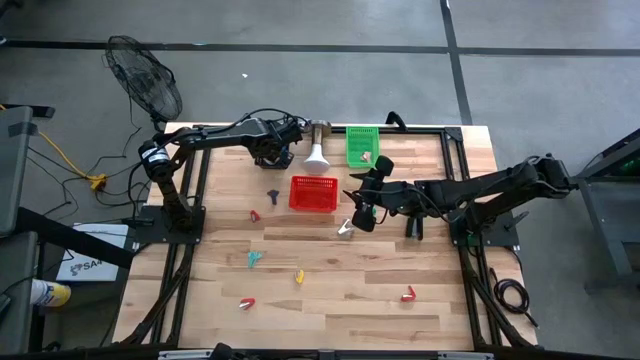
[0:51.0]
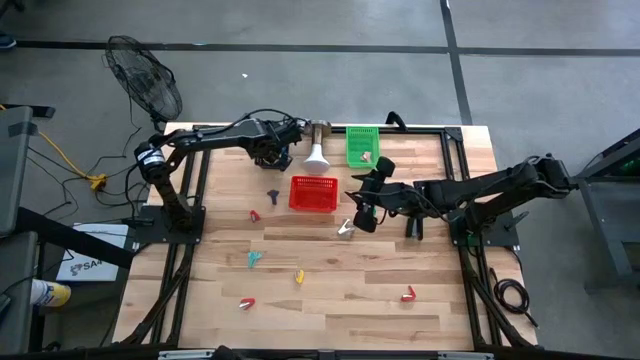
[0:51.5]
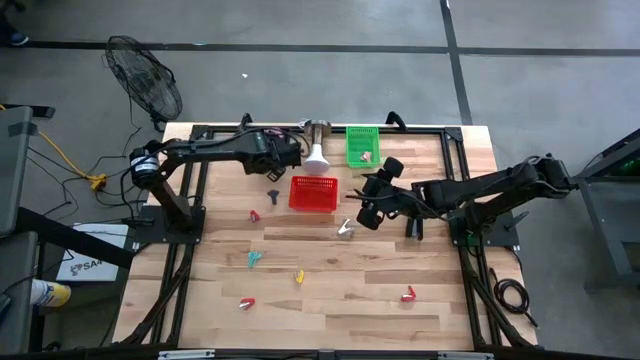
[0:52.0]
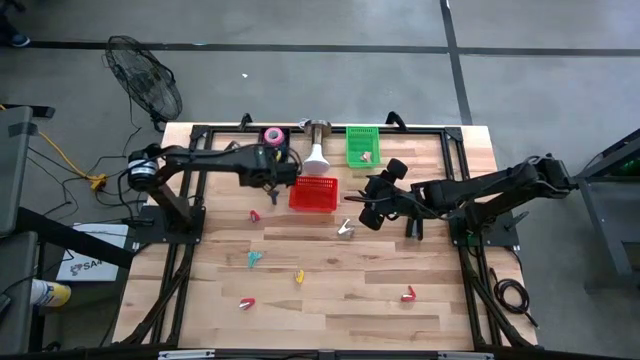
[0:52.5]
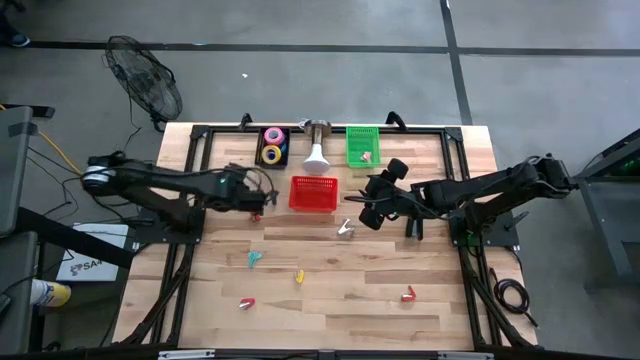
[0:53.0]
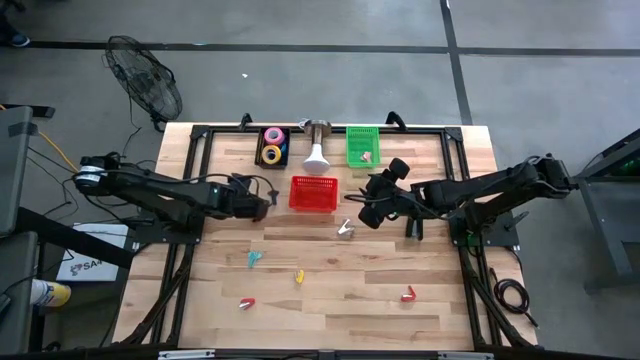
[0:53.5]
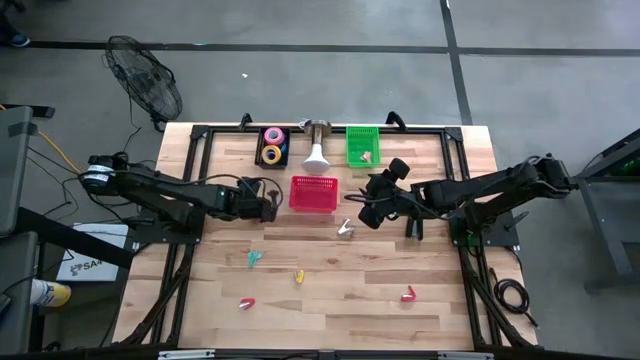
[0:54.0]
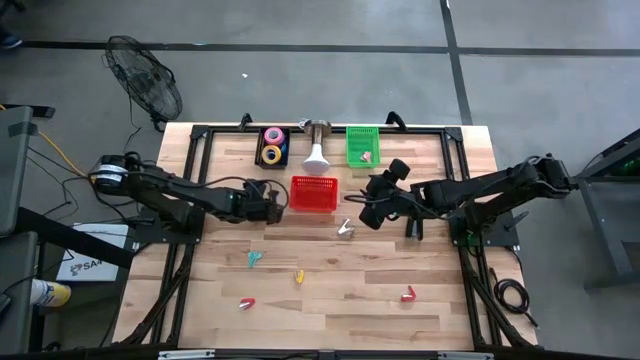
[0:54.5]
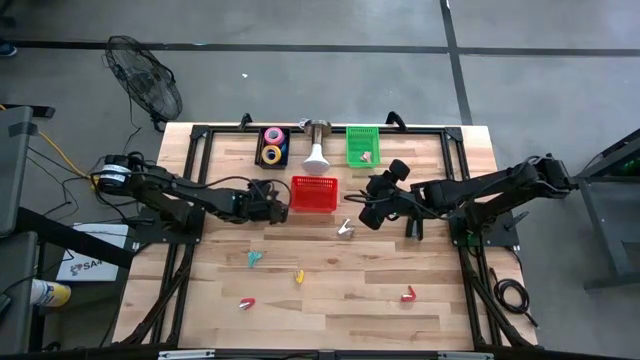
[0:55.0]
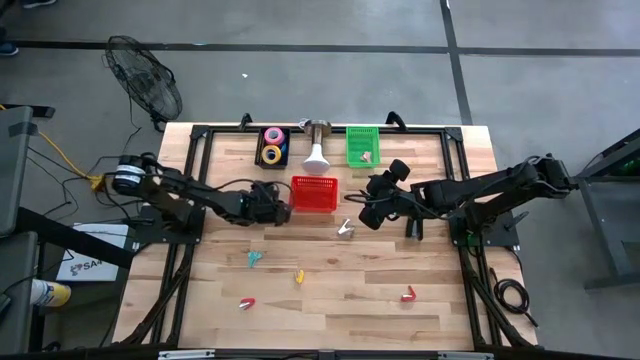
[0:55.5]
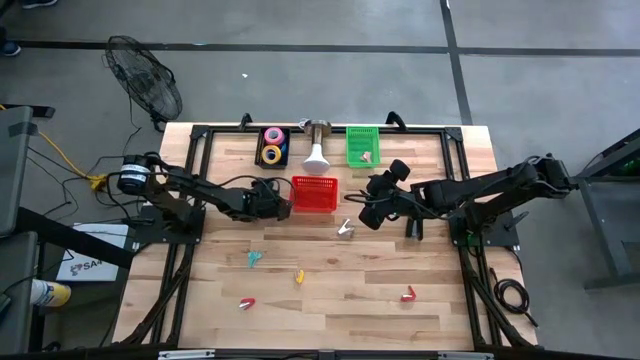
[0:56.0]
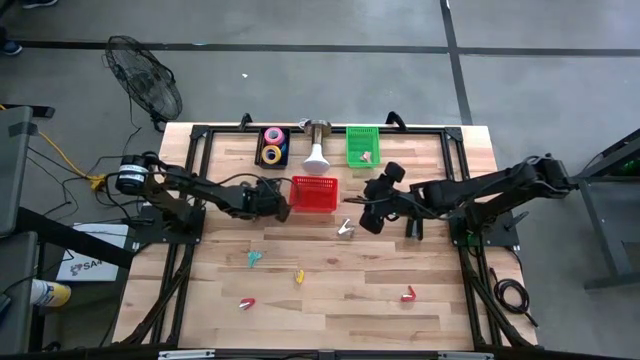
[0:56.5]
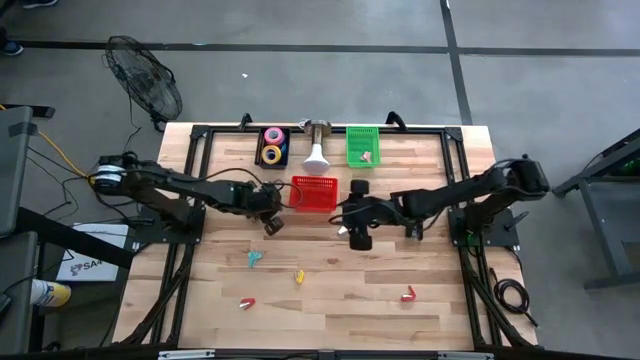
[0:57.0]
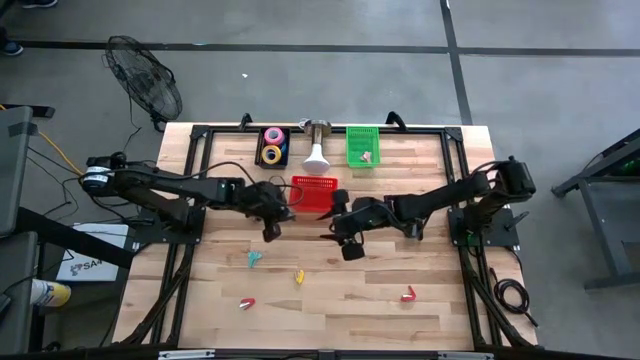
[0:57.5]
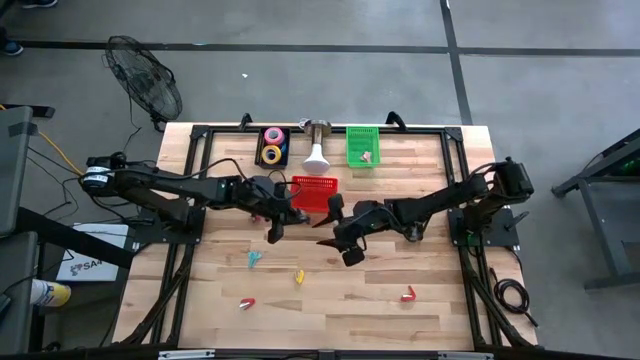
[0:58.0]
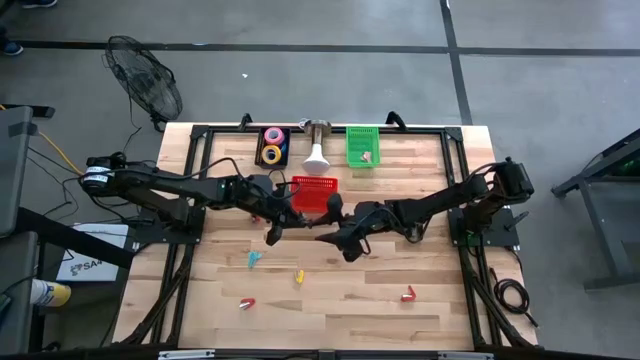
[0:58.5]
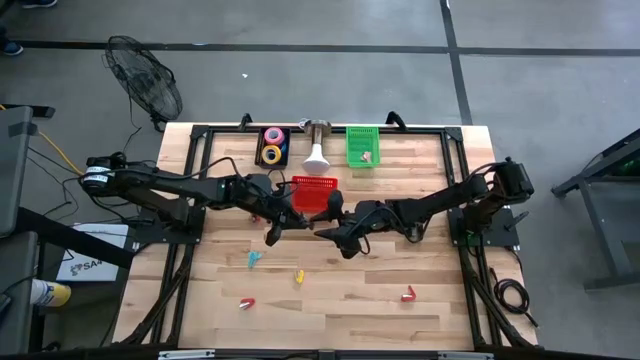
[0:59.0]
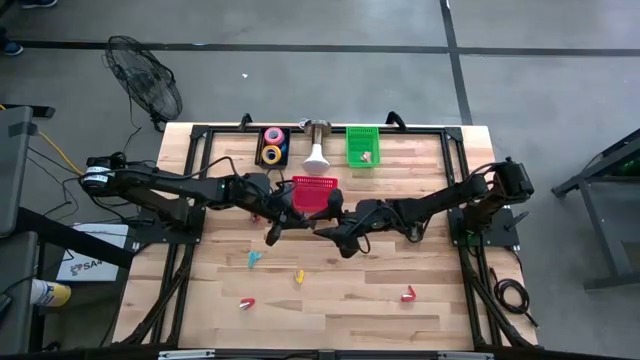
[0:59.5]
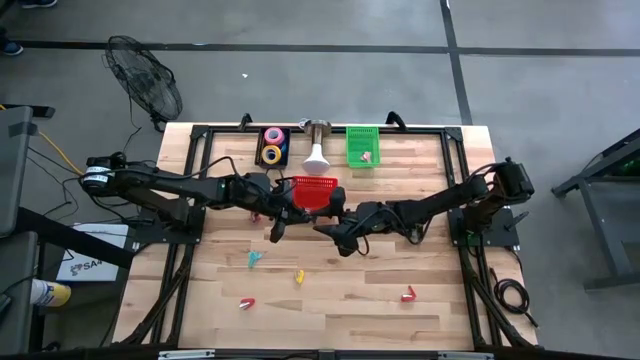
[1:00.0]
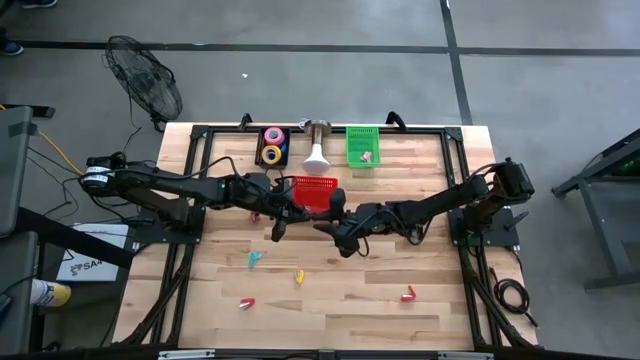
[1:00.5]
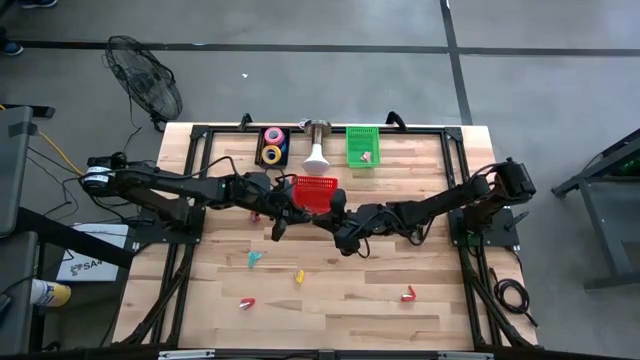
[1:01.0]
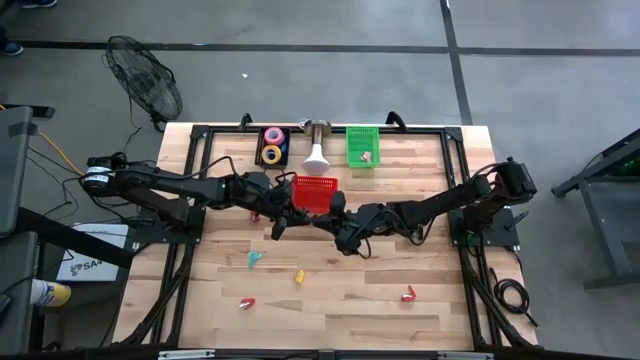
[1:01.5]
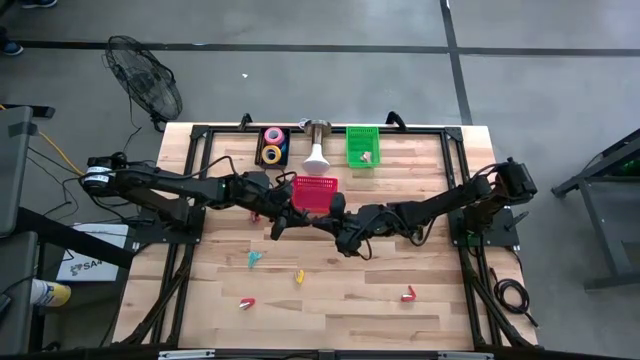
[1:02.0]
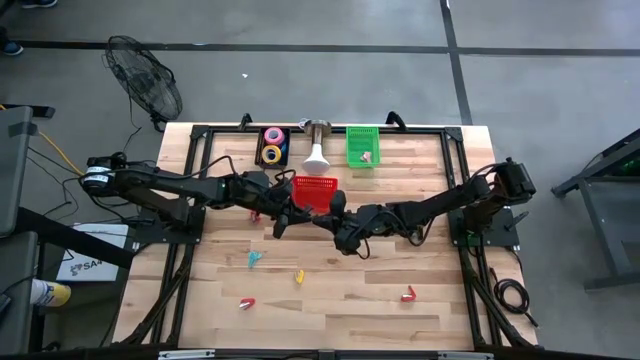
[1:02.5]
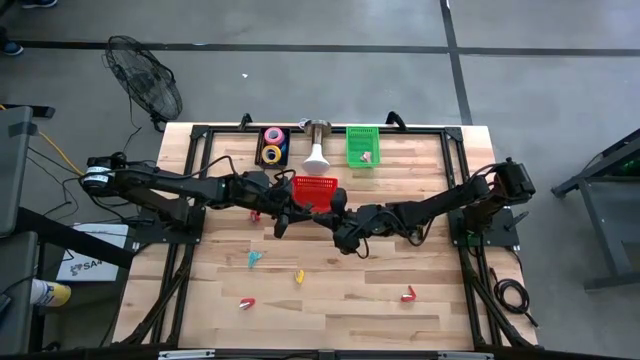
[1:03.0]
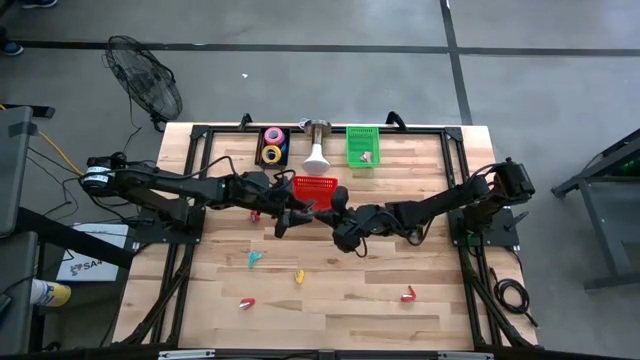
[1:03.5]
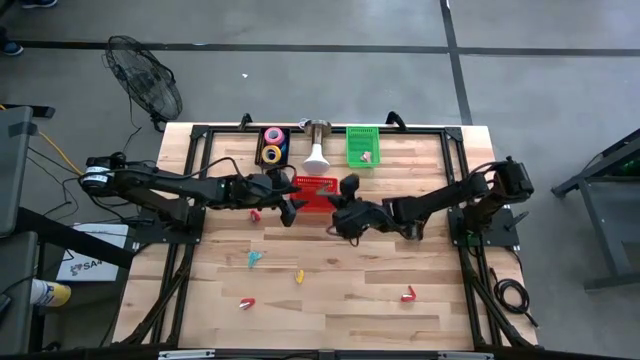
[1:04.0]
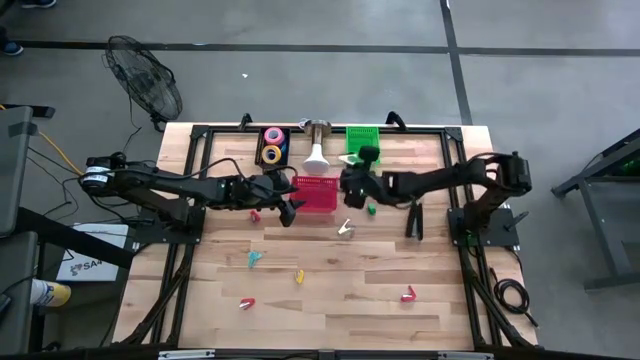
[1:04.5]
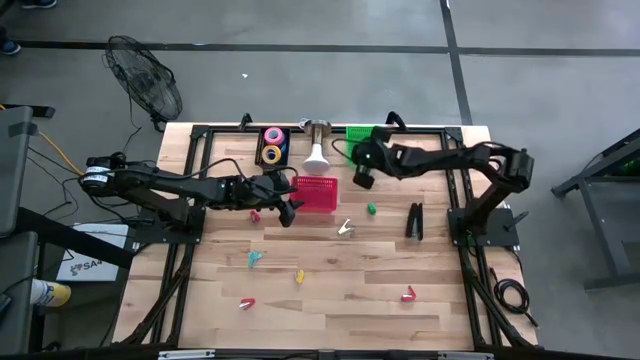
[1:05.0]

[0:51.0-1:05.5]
Task: Pick and place Stapler, Stapler remover, tape
Put the black staple remover into the green basket

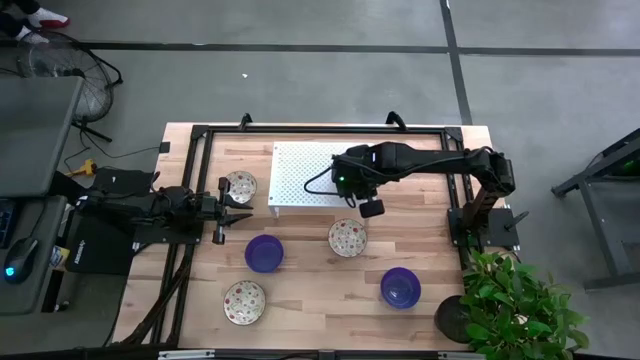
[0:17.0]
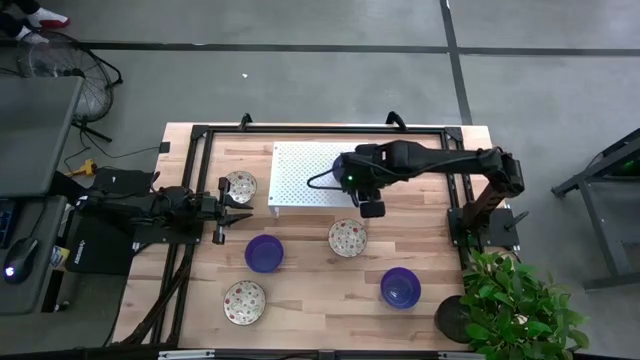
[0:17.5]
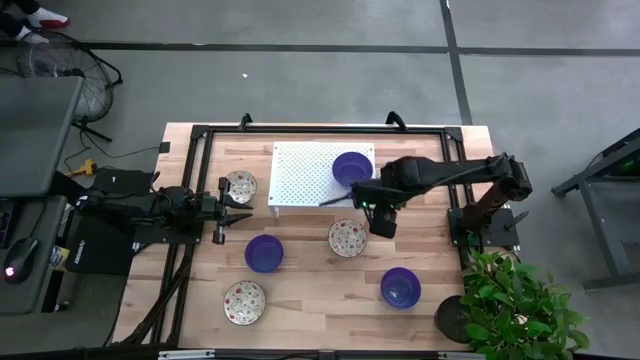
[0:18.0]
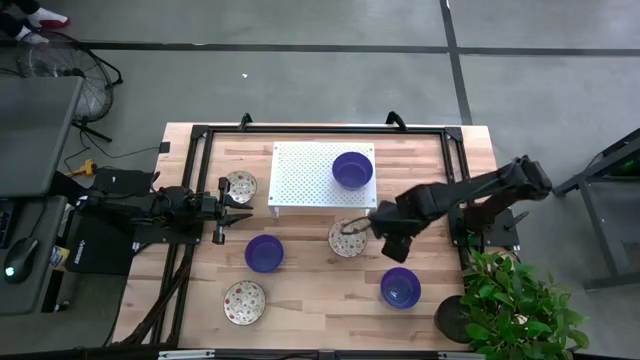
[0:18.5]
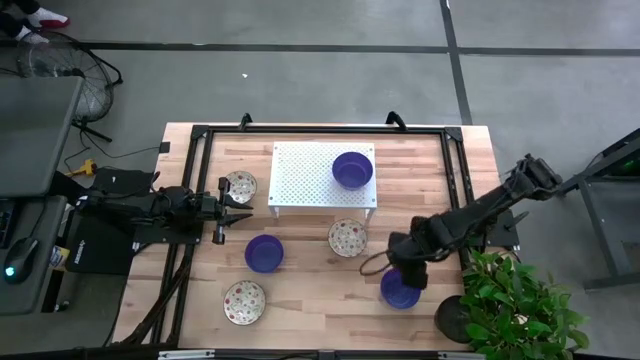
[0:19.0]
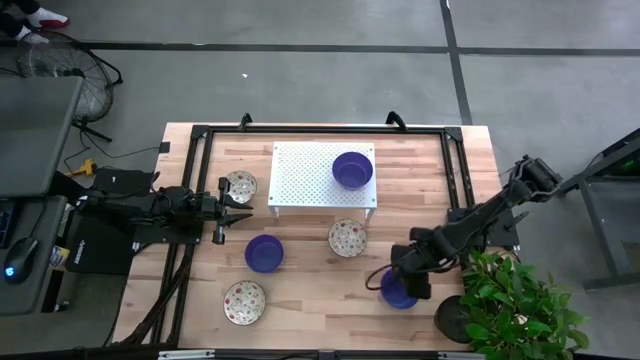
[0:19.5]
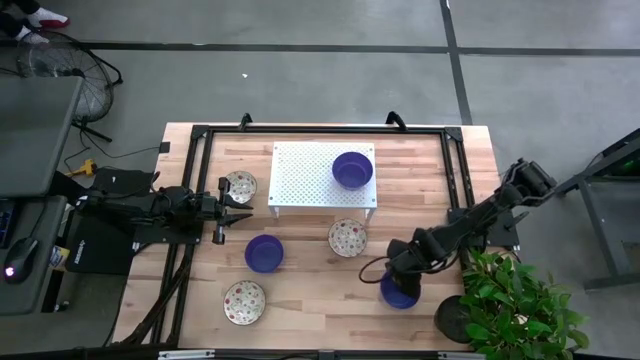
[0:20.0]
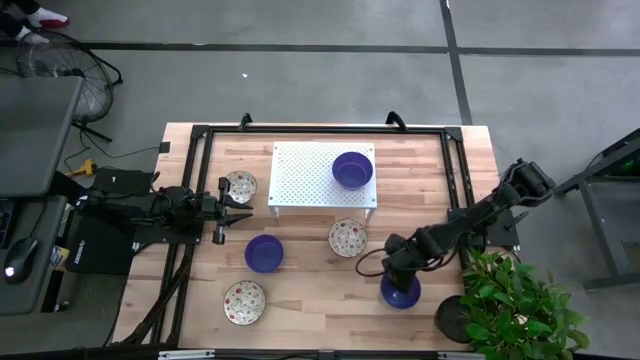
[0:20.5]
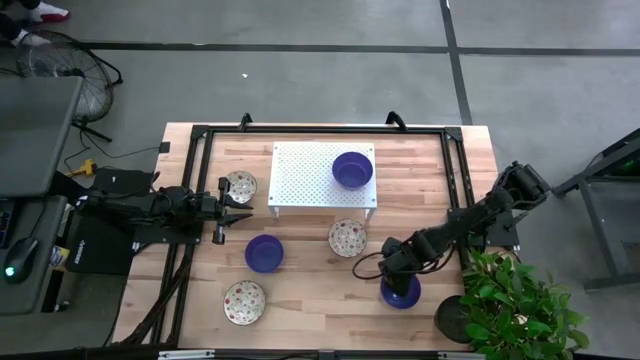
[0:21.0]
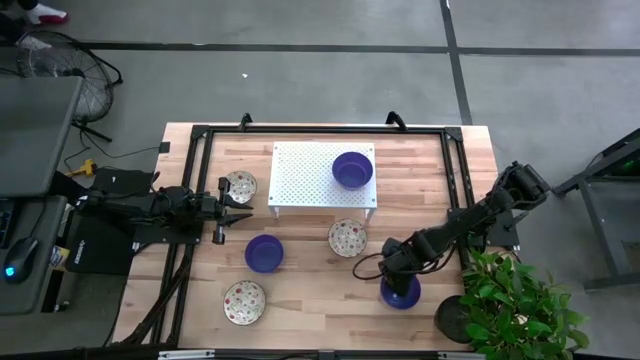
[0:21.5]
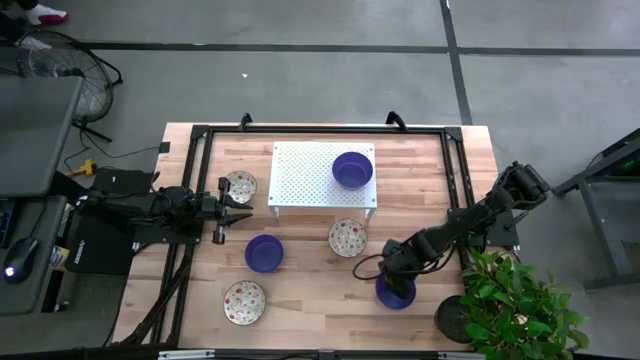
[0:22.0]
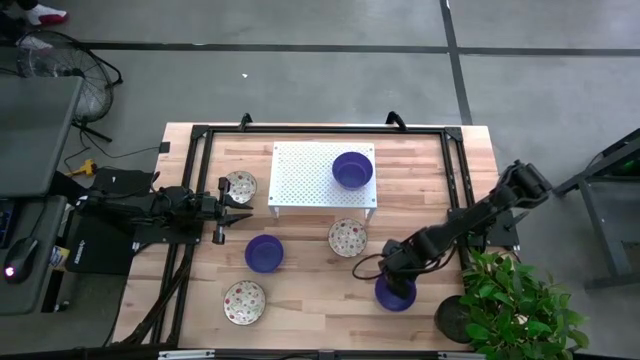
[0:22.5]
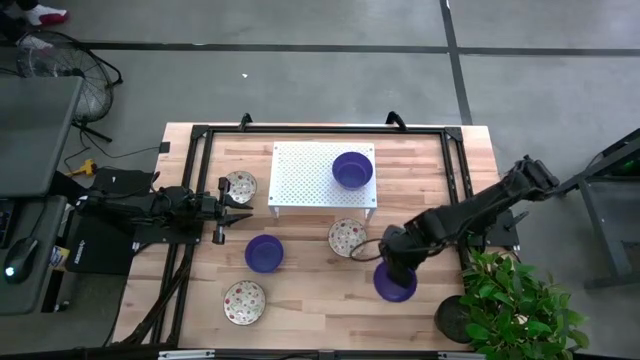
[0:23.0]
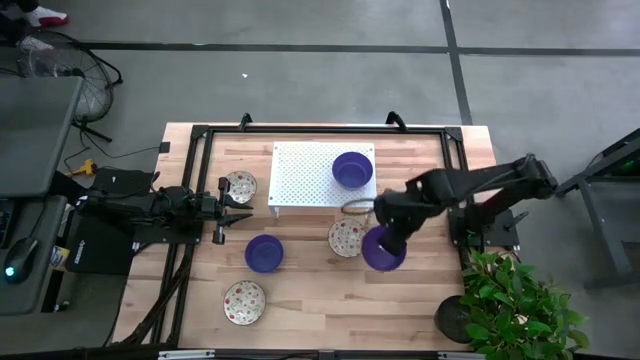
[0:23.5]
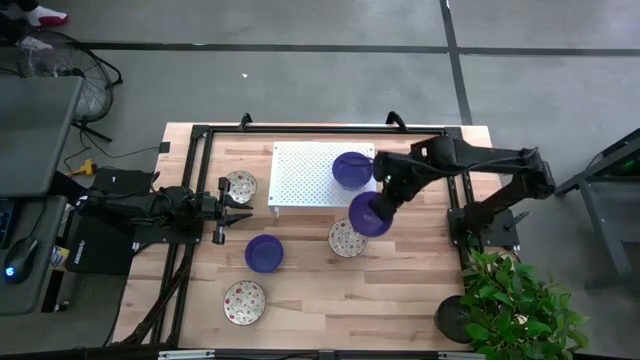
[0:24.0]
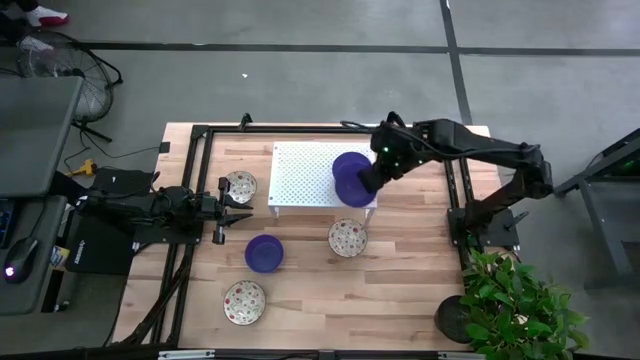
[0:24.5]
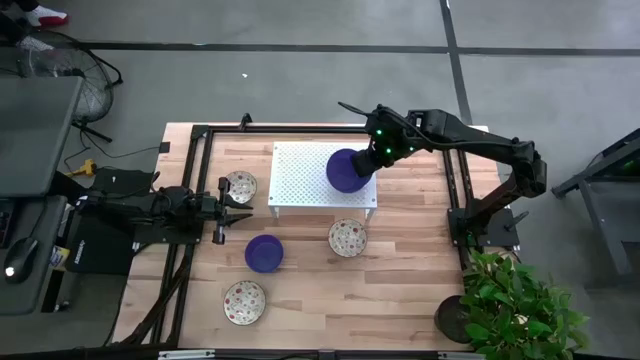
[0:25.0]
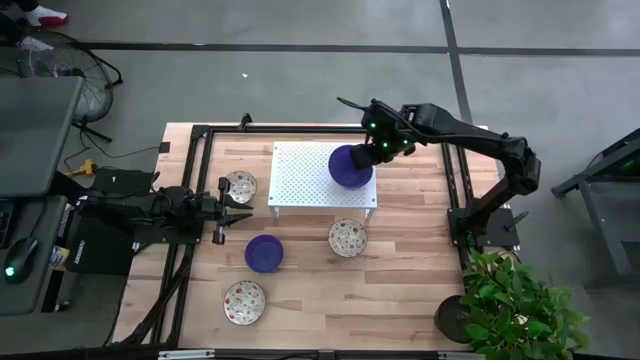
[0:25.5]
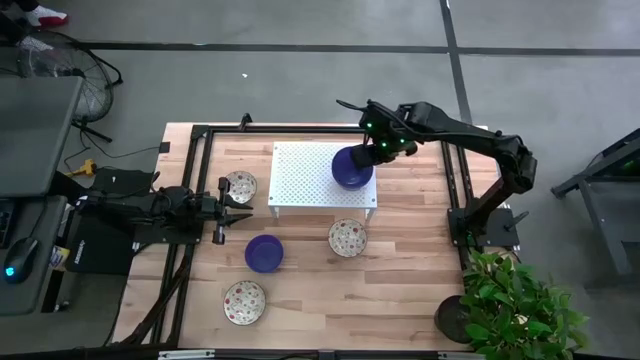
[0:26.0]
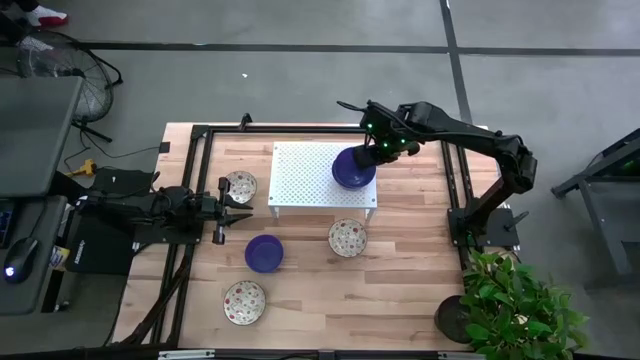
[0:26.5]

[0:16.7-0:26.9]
Task: Pick & Place Mini bowls
Stack the right blue bowl on top of the blue bowl on the shelf
